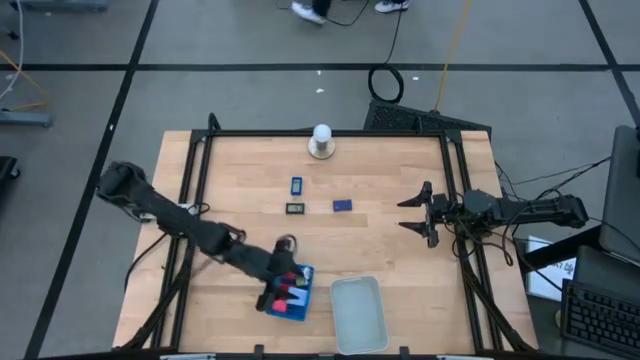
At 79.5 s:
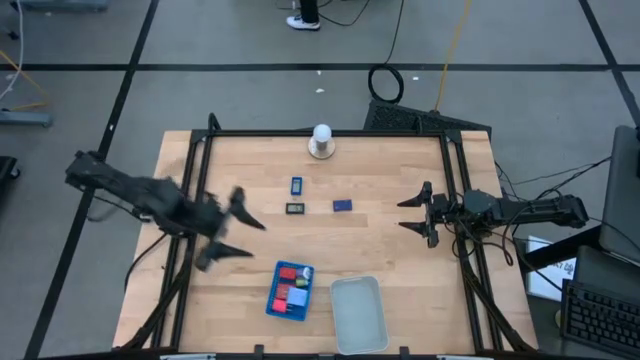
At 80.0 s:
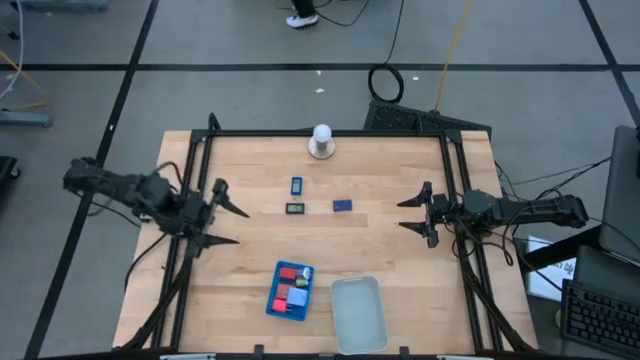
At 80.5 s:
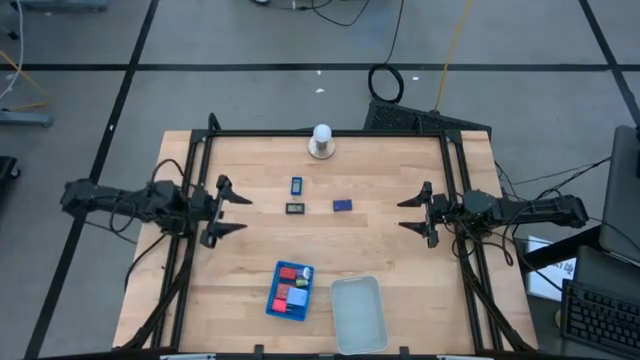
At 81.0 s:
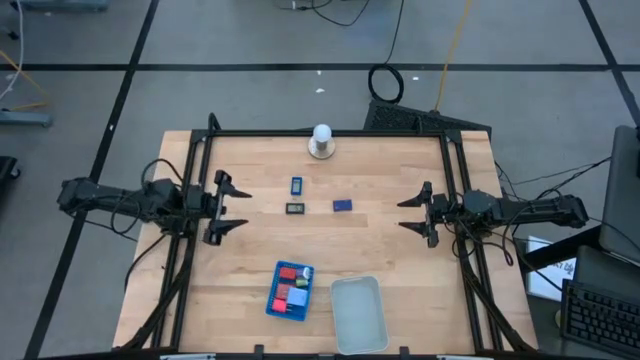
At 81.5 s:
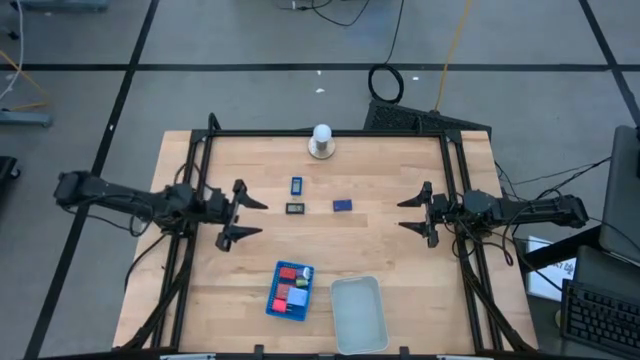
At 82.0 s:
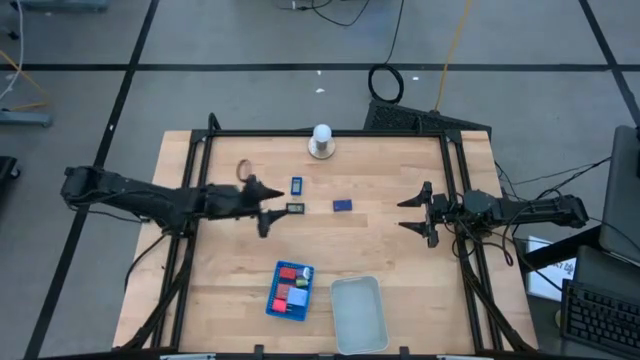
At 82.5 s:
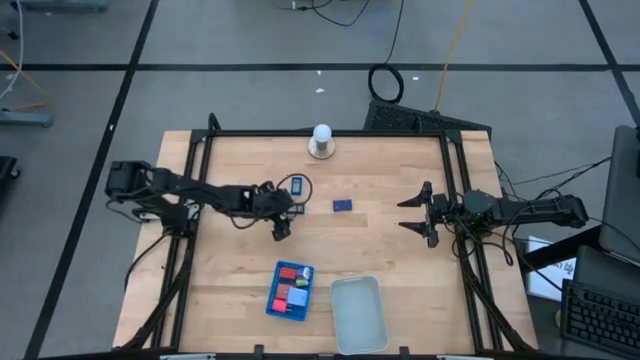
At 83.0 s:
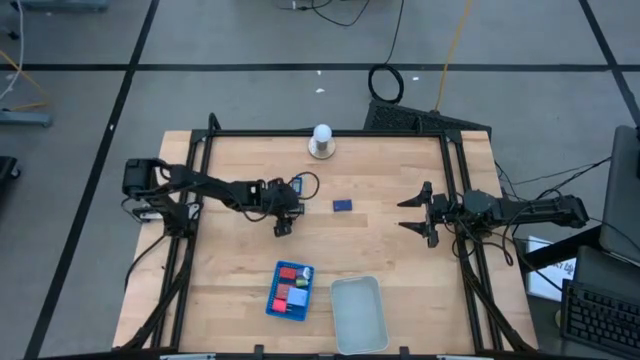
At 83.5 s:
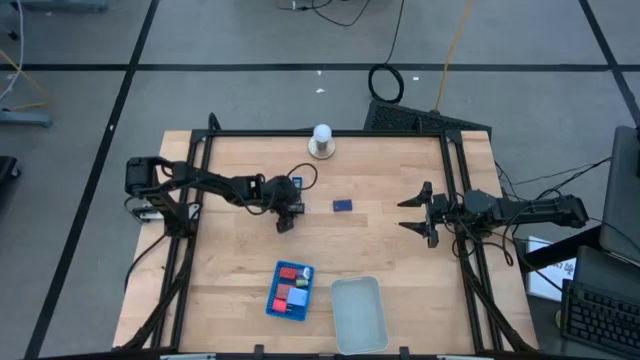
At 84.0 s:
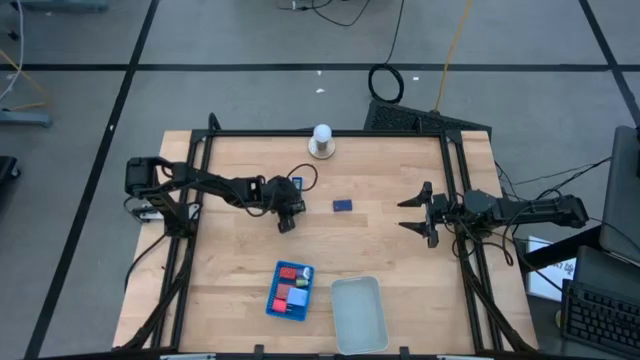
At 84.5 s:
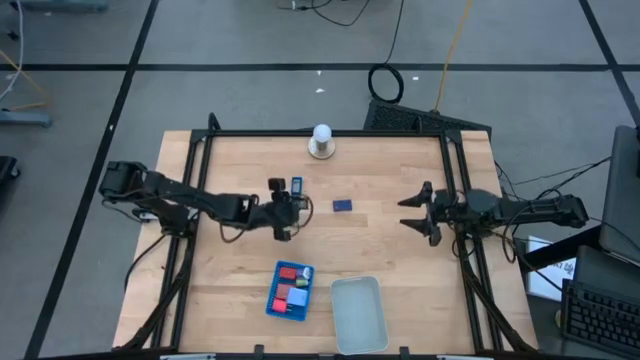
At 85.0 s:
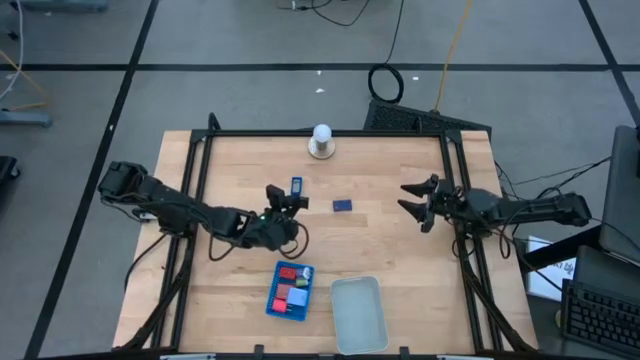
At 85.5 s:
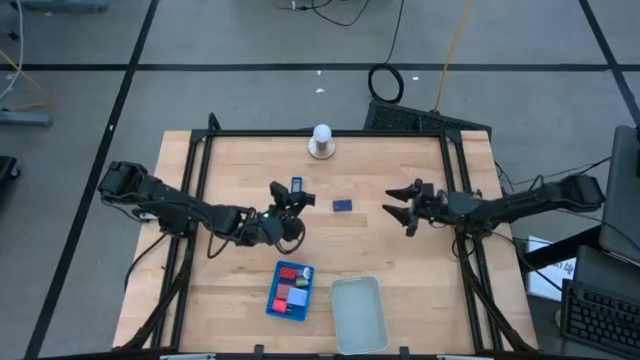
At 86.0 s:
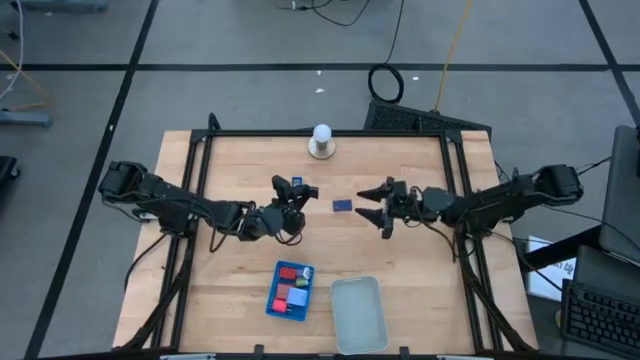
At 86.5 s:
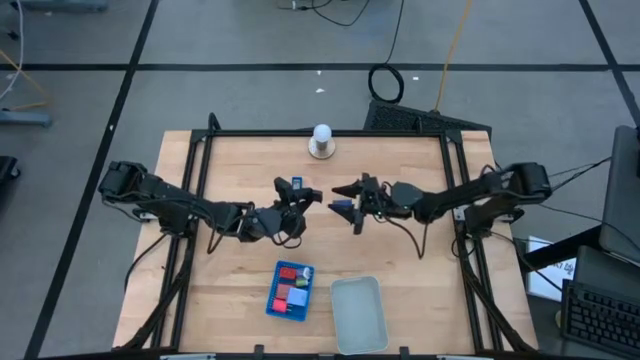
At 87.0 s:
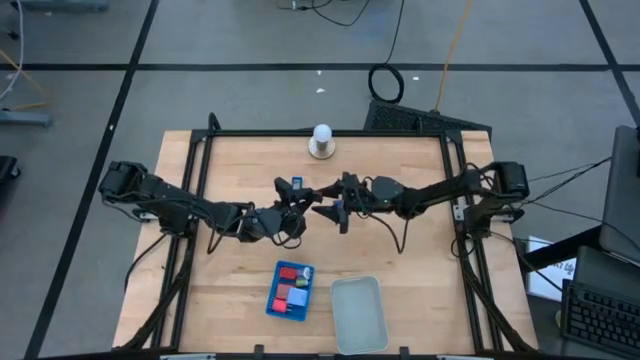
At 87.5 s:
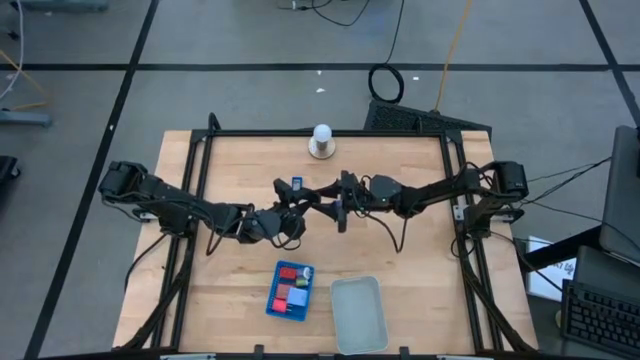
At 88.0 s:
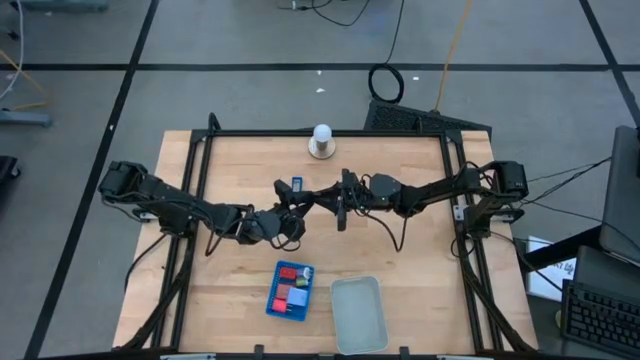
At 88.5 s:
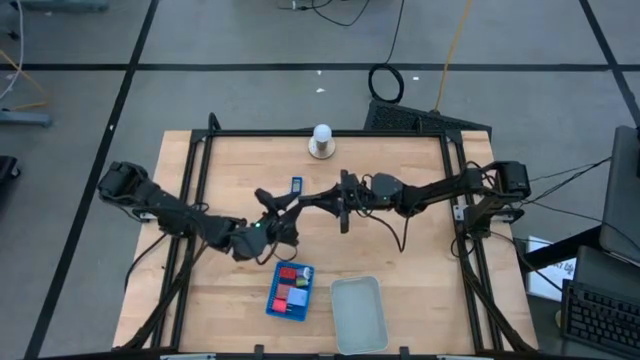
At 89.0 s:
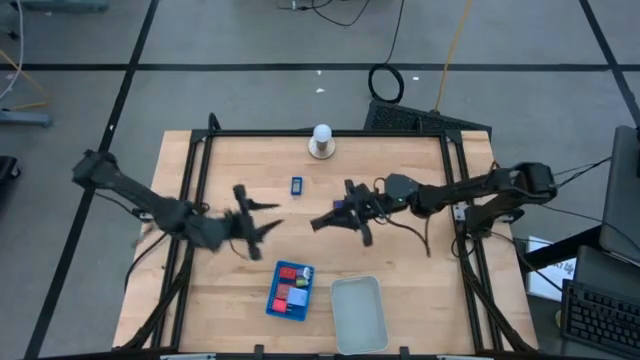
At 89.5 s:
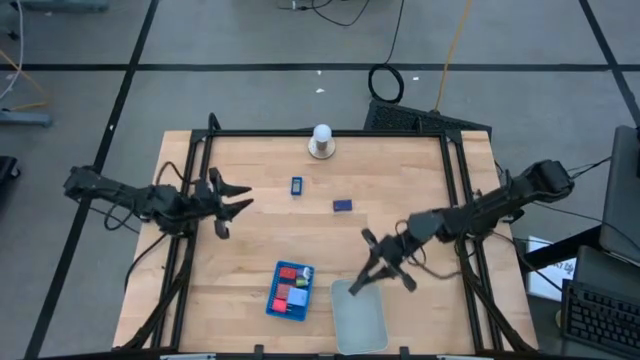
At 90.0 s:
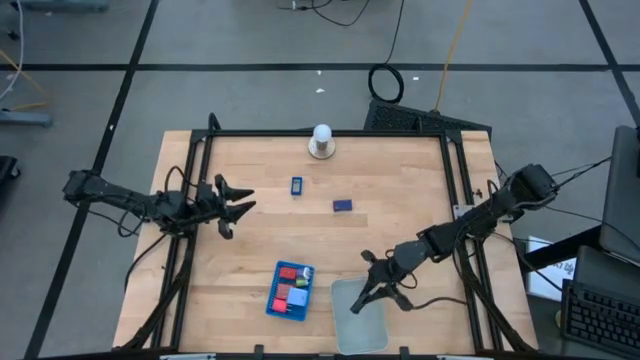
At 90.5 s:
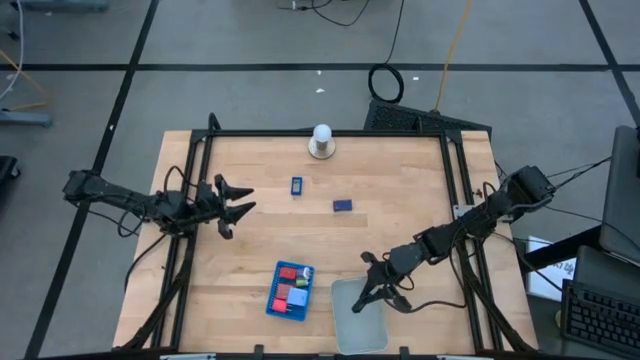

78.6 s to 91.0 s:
Task: Pick & Place Office items
Put the black digital timer into the gray bin

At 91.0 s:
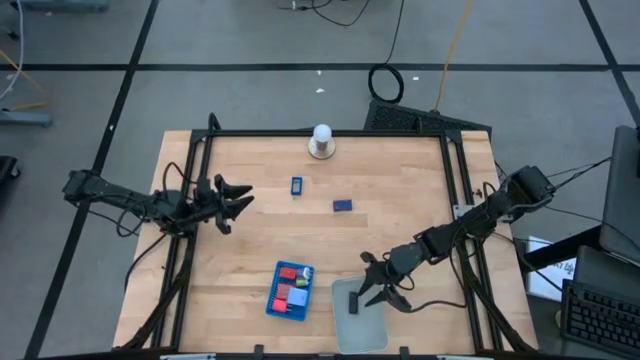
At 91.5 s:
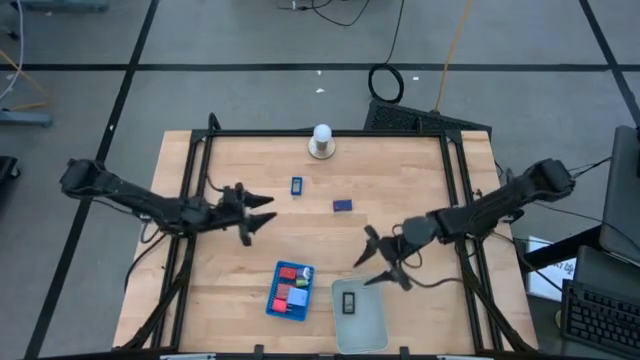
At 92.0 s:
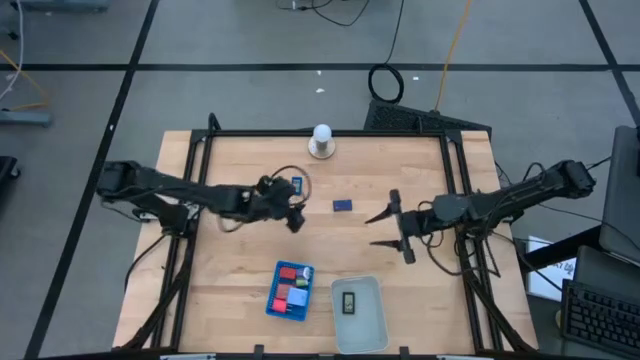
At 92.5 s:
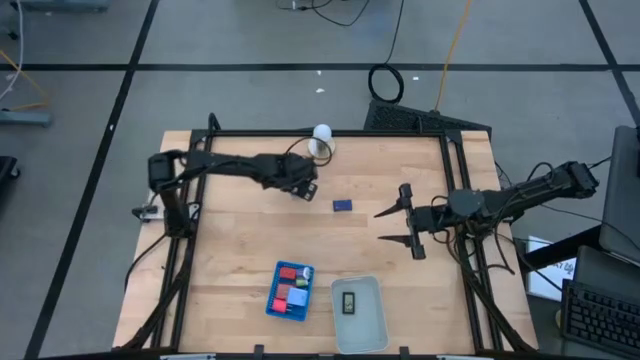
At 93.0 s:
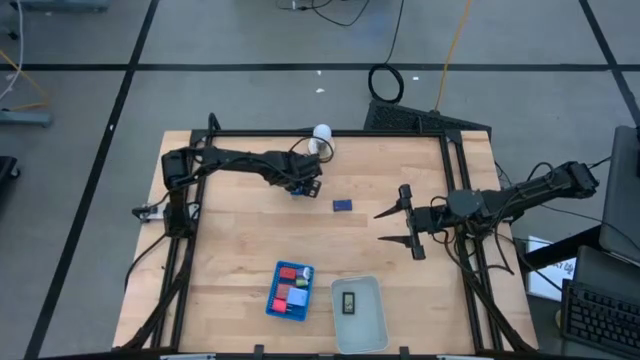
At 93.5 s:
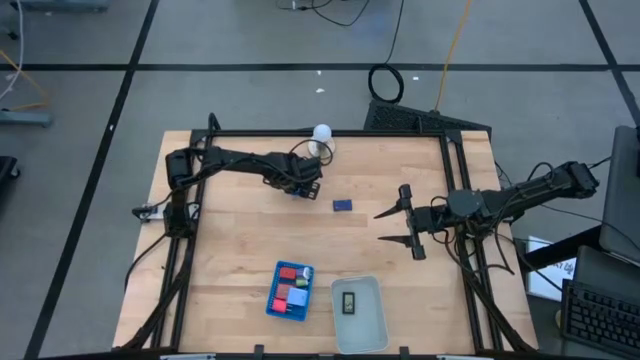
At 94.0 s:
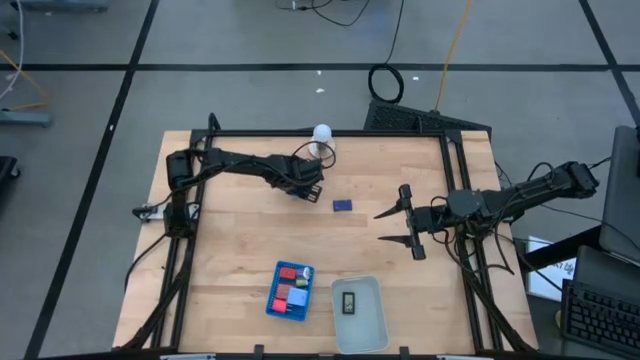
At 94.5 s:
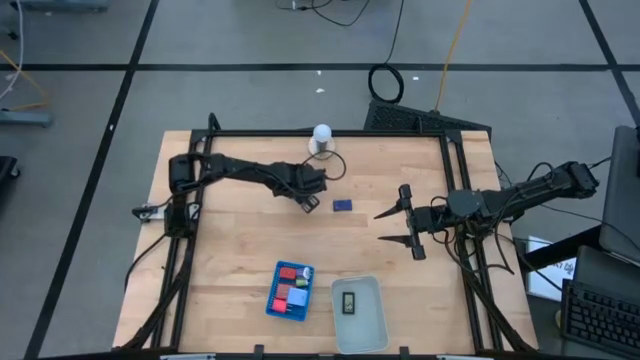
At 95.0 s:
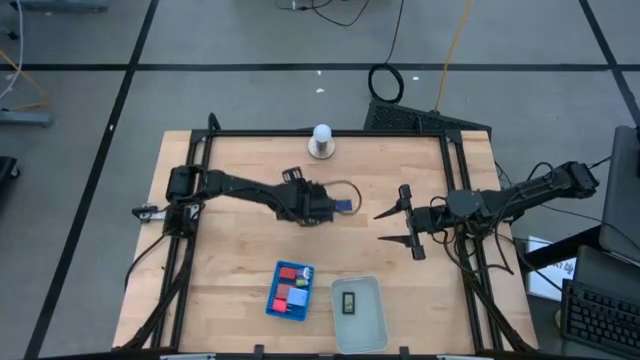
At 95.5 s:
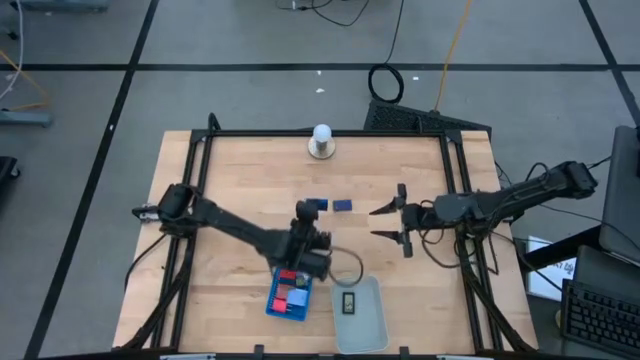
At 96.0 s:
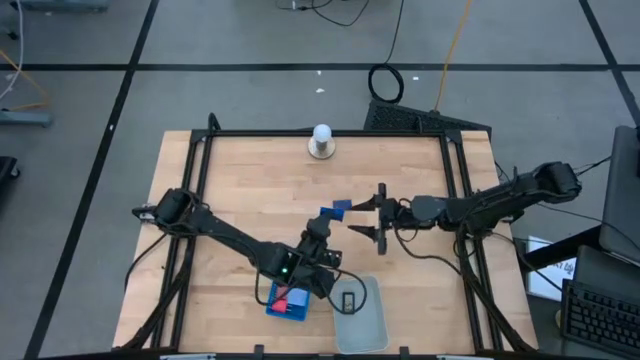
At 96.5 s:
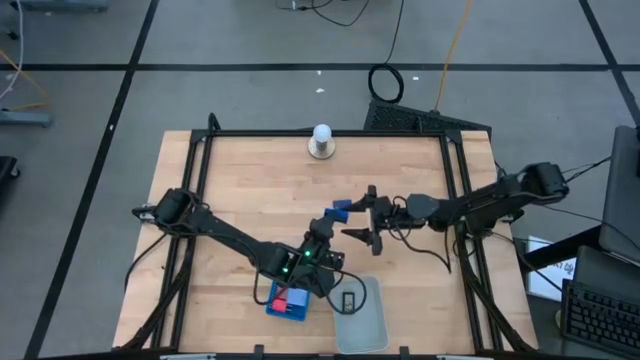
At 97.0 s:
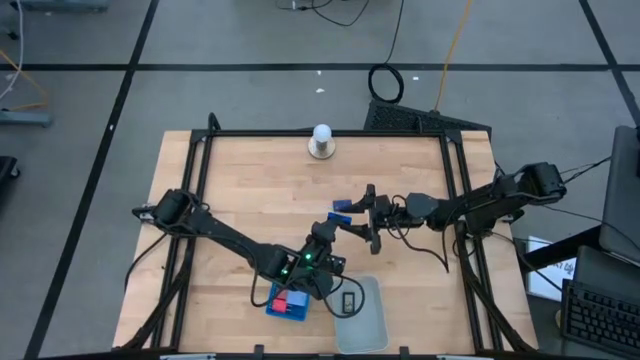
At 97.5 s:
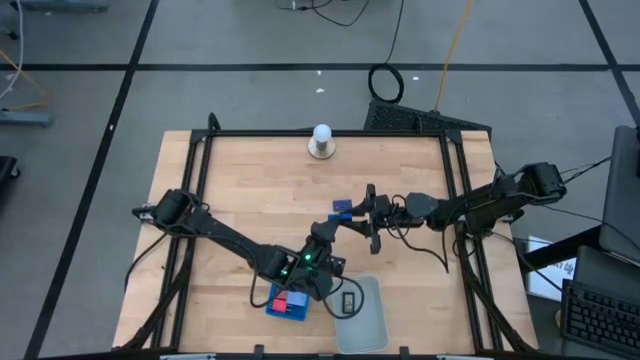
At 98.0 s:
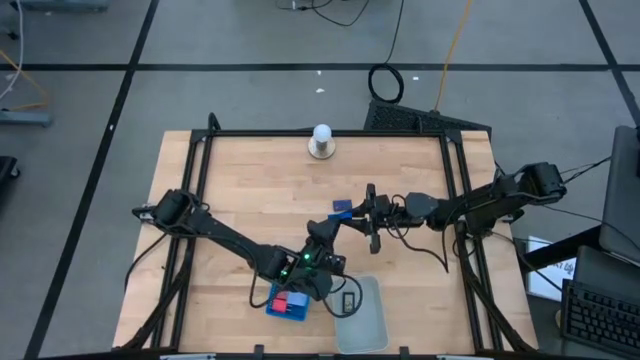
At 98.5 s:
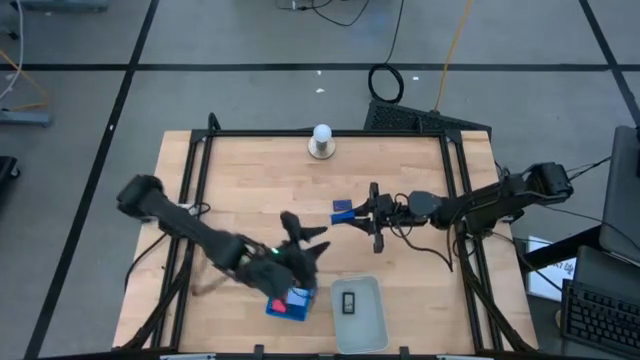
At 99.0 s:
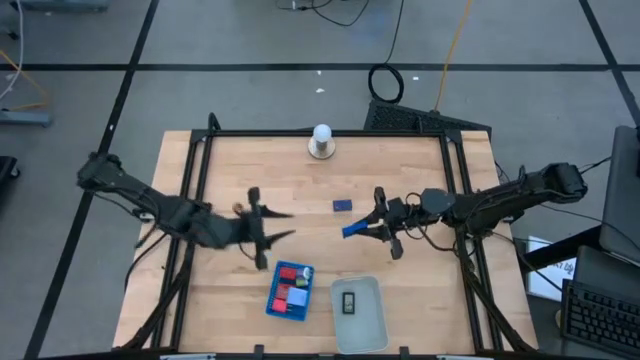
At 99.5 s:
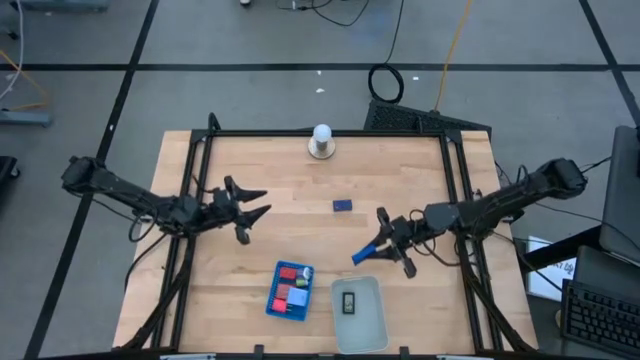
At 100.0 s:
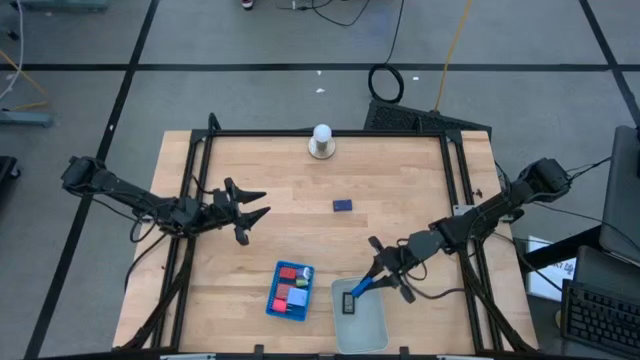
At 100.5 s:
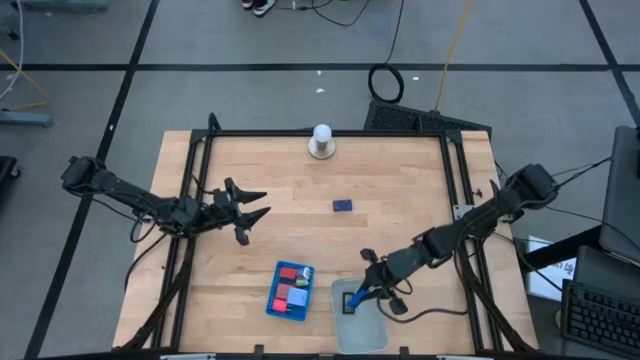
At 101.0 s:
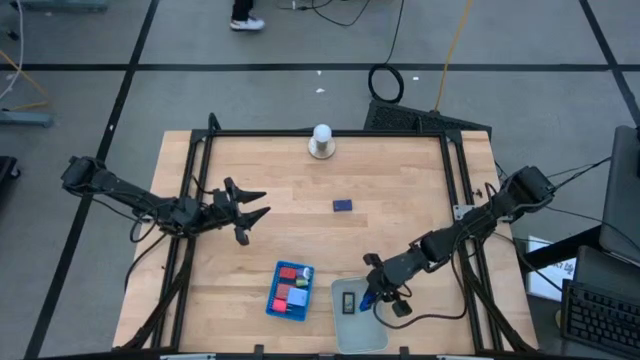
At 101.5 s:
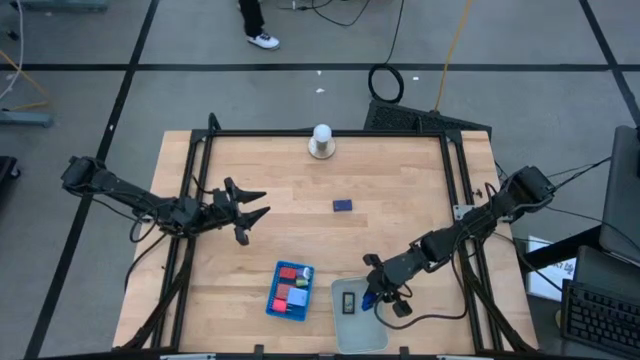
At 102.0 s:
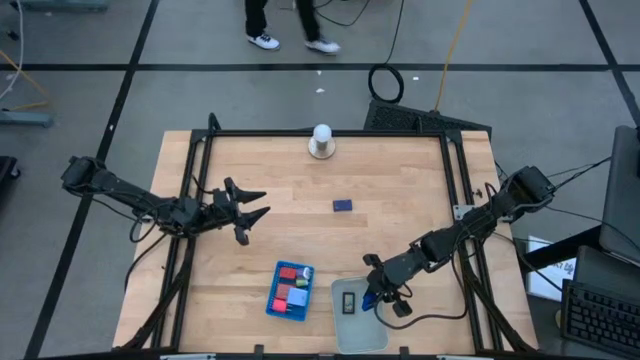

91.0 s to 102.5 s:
Put the top blue digital timer into the gray bin
